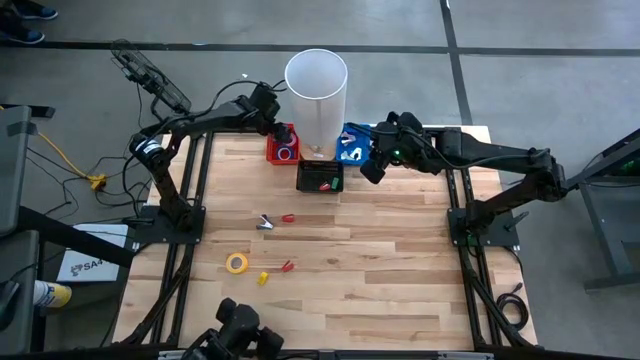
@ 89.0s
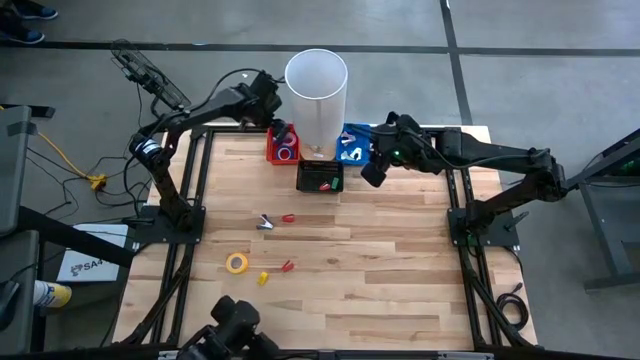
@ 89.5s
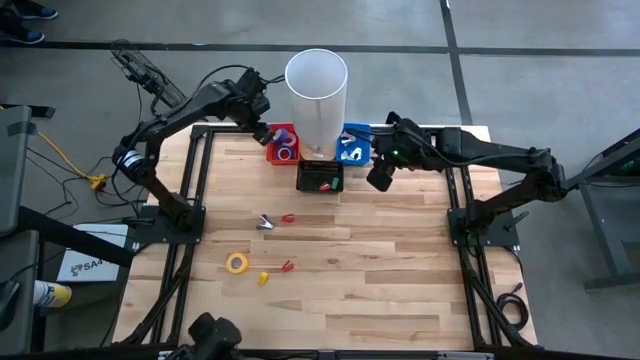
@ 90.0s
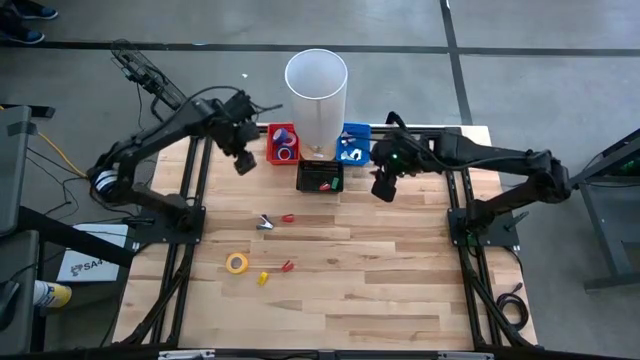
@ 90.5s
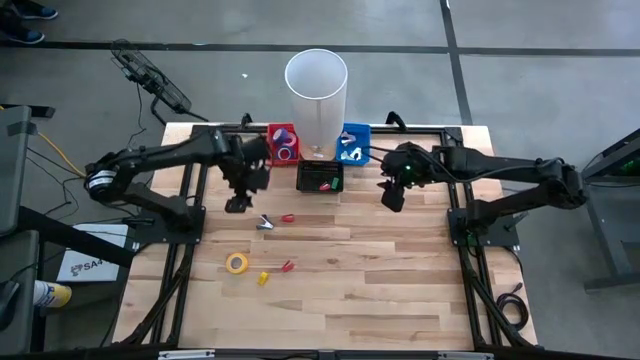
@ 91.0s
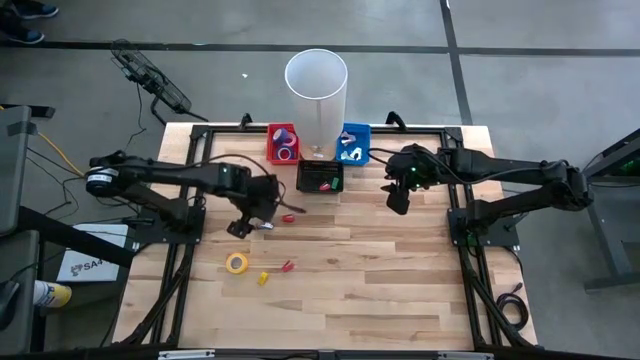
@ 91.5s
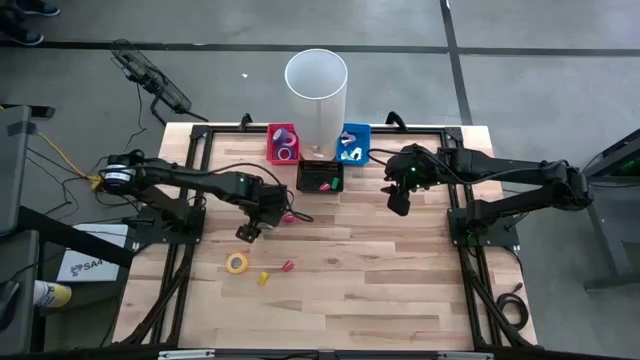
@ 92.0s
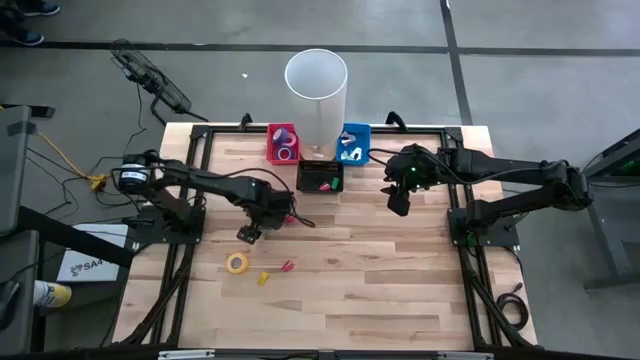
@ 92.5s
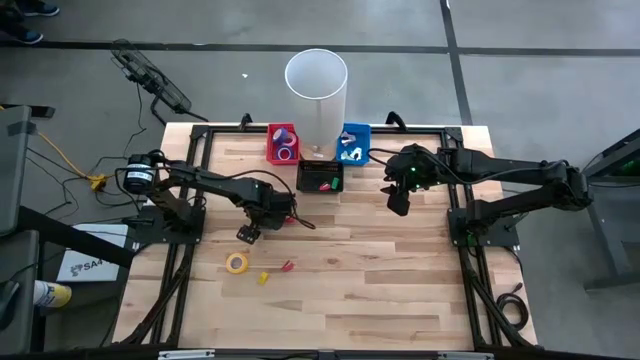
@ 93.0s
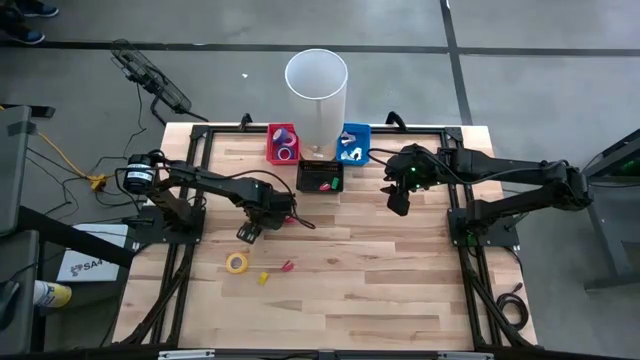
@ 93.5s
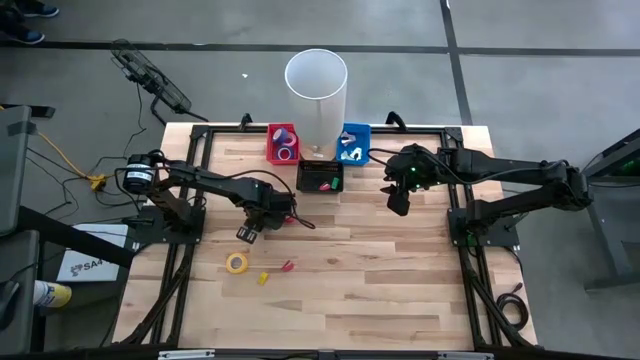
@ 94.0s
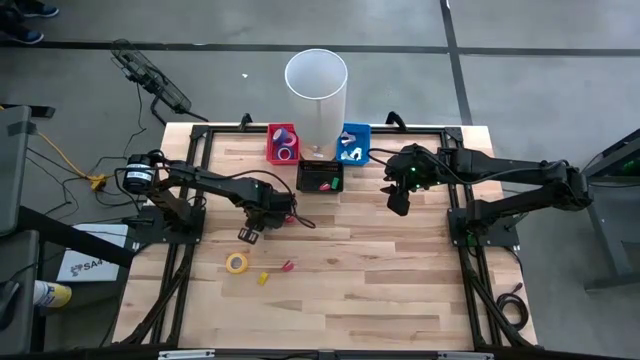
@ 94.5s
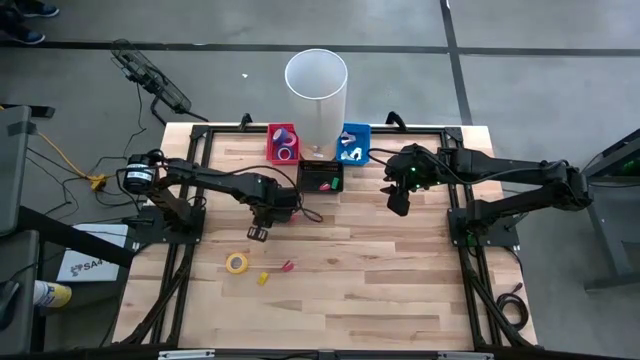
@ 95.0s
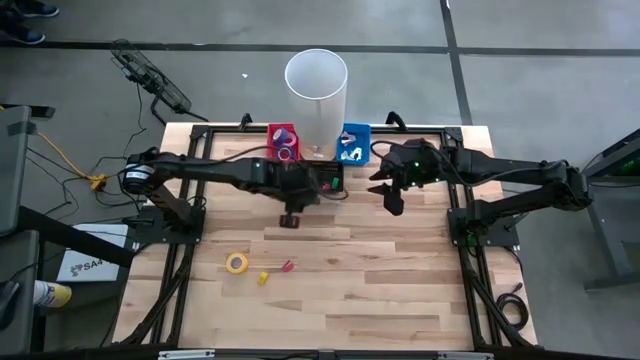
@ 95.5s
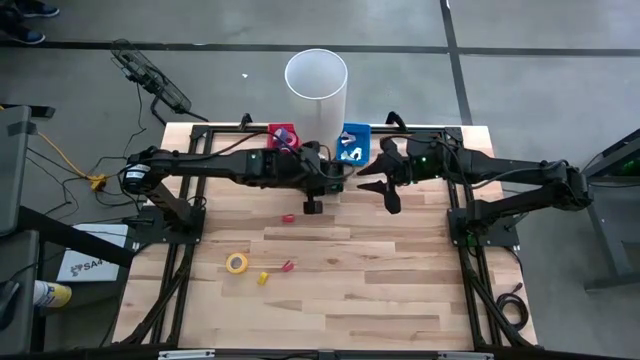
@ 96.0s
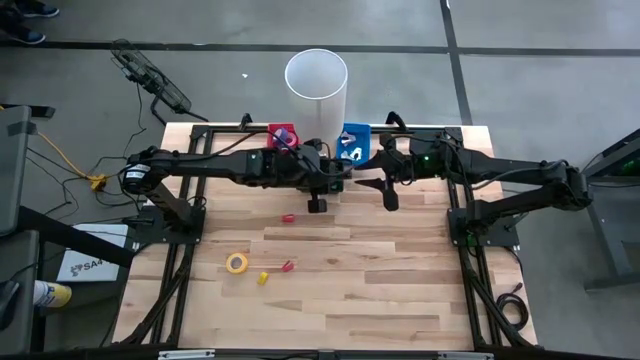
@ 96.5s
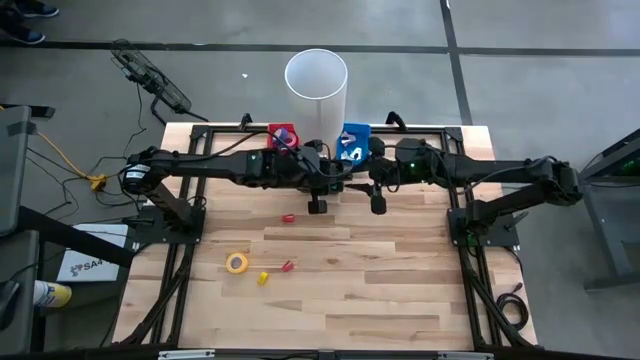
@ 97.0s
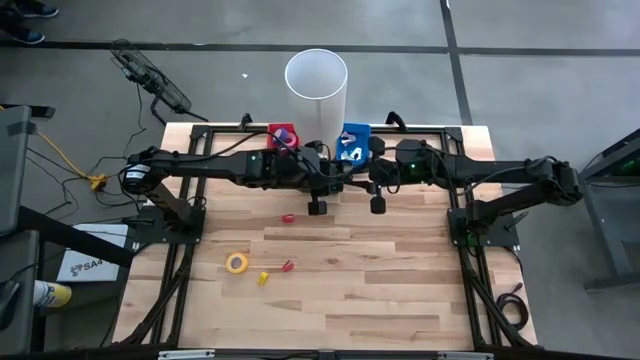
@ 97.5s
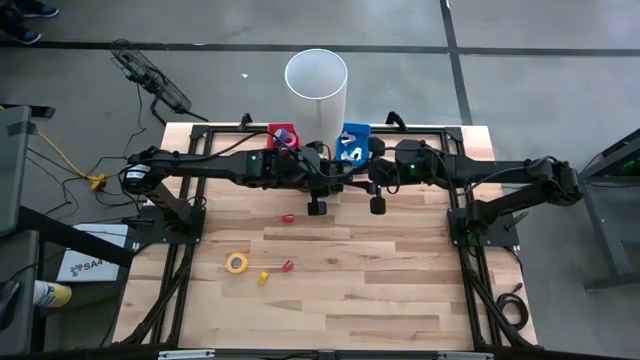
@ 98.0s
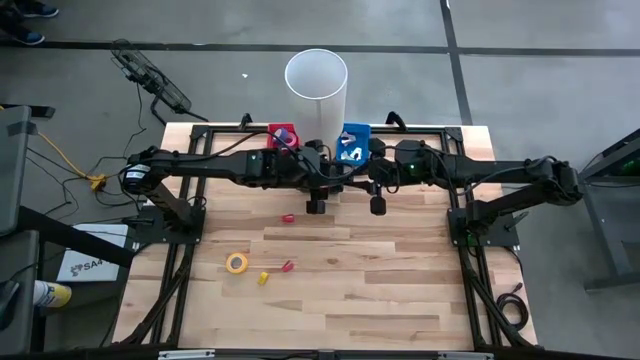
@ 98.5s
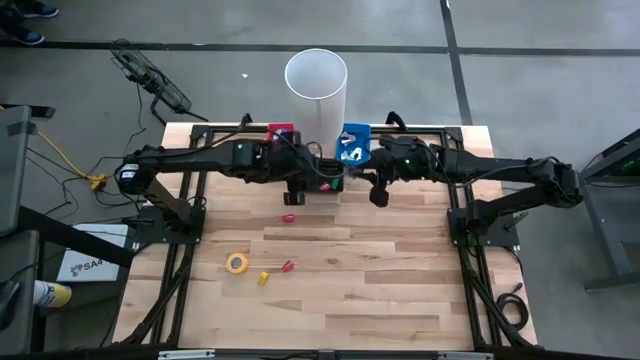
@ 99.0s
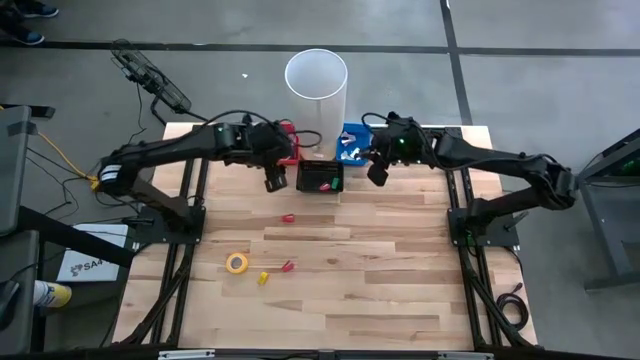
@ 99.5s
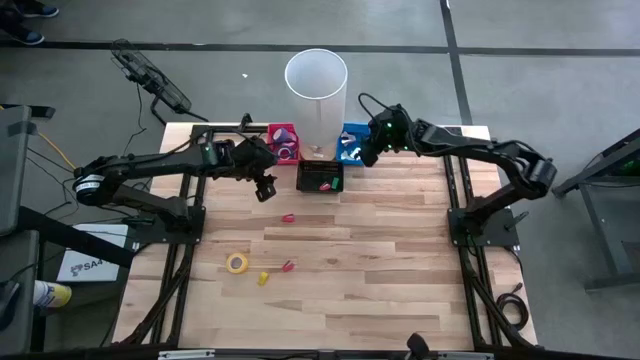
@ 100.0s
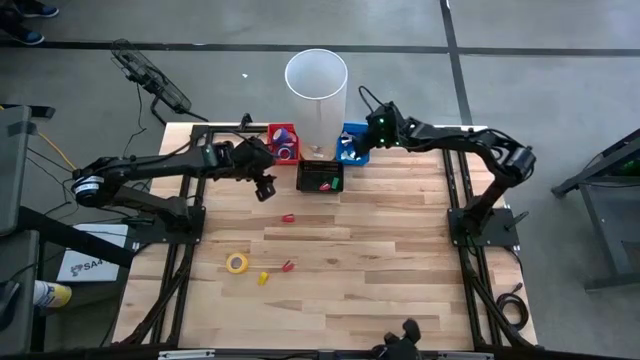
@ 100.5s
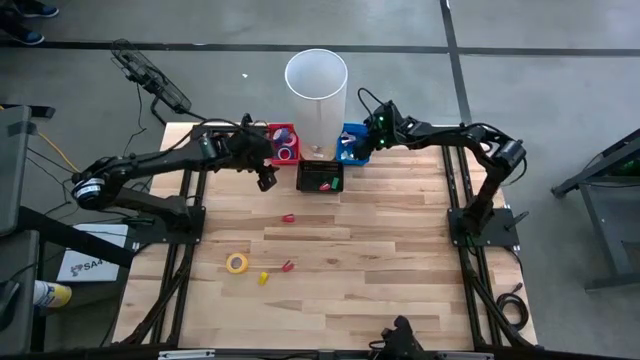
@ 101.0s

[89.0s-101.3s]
Task: Pick and place Stapler, Stapler remover, tape
Put the black staple remover into the blue bin

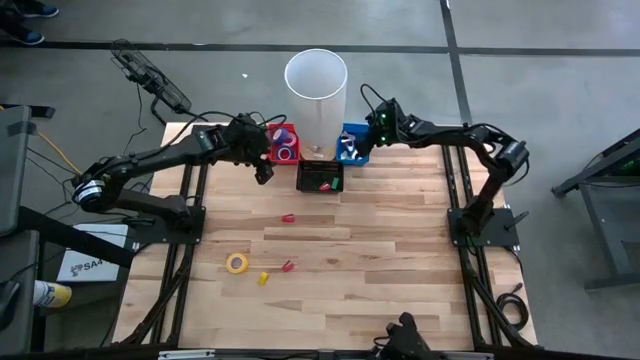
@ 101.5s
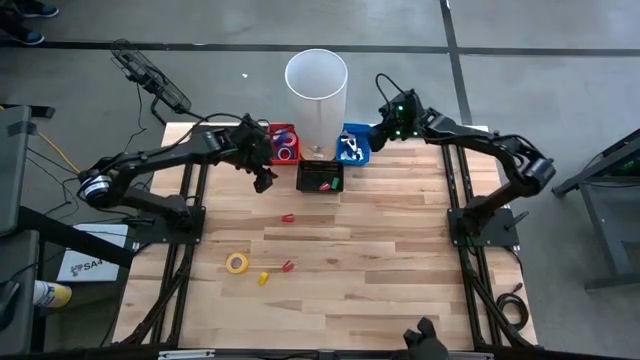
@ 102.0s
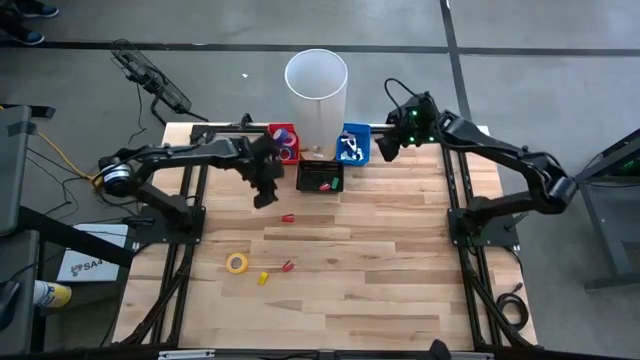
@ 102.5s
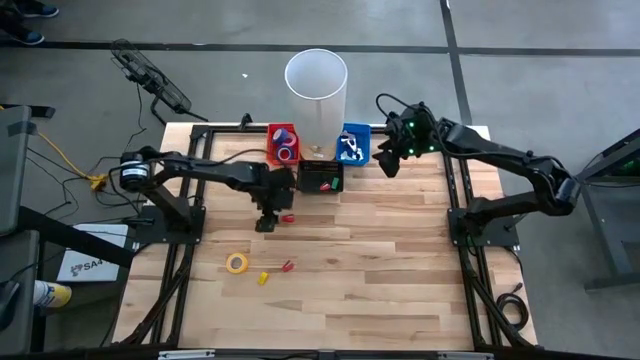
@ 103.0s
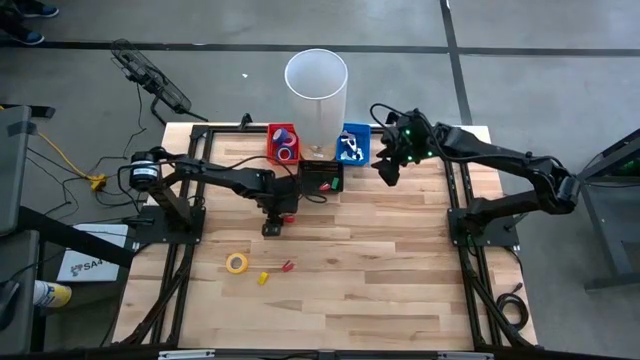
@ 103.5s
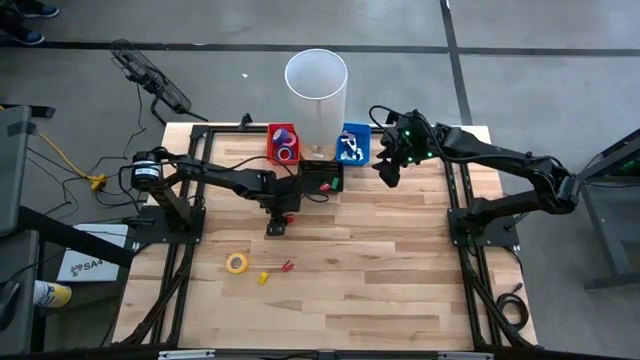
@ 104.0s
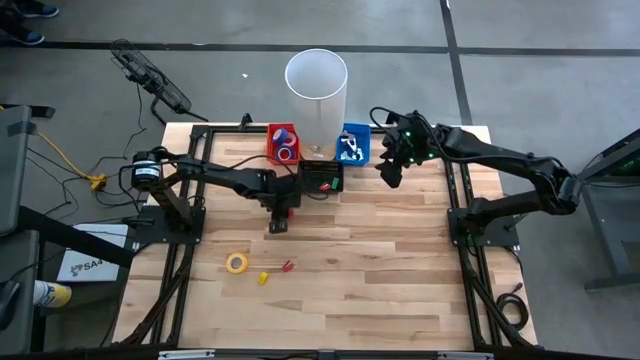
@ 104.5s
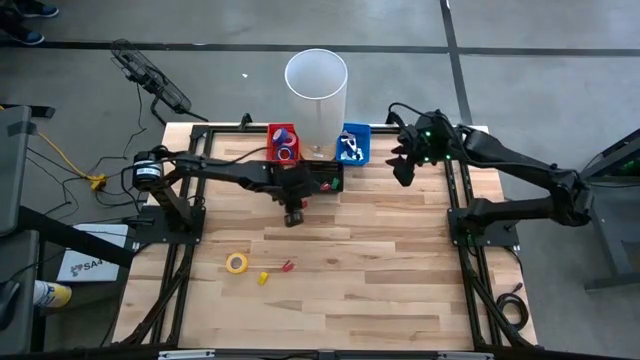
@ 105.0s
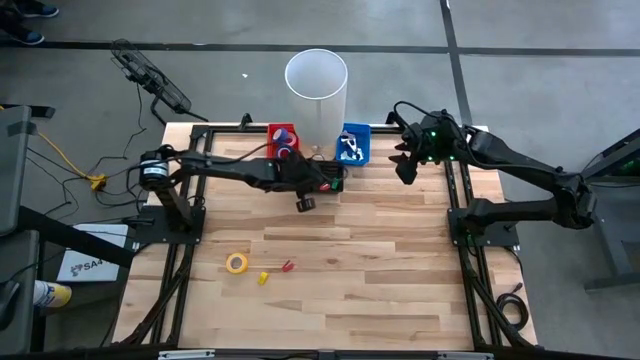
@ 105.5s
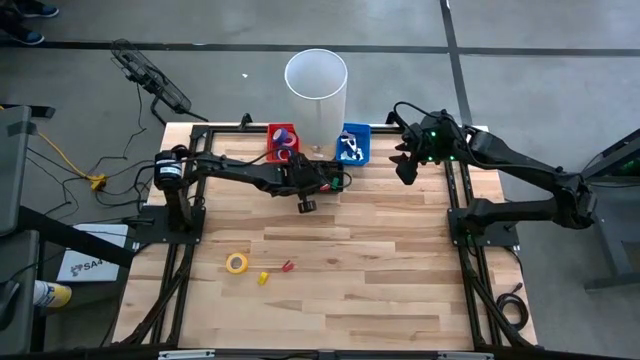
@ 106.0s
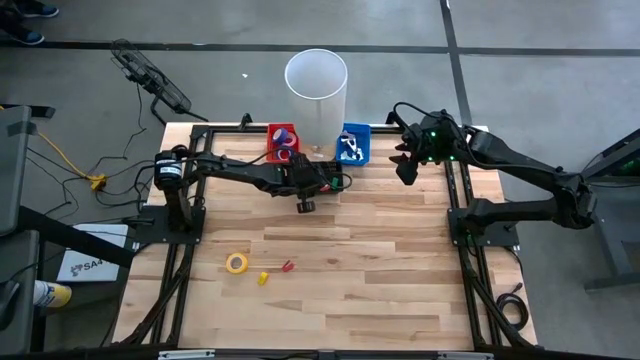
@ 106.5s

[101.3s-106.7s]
Put the red mini stapler into the black bin

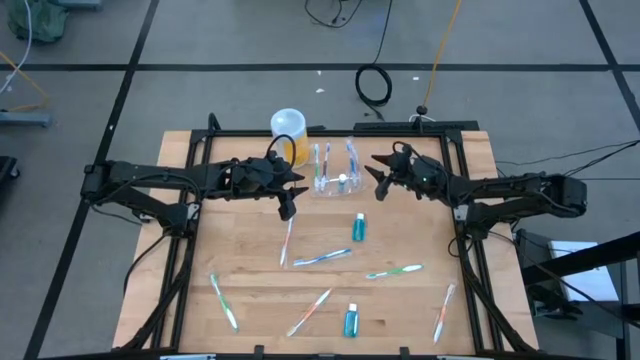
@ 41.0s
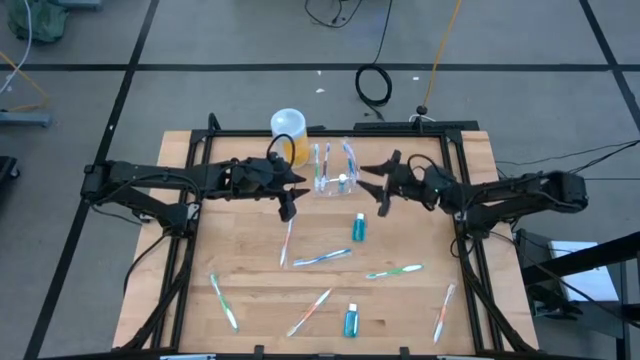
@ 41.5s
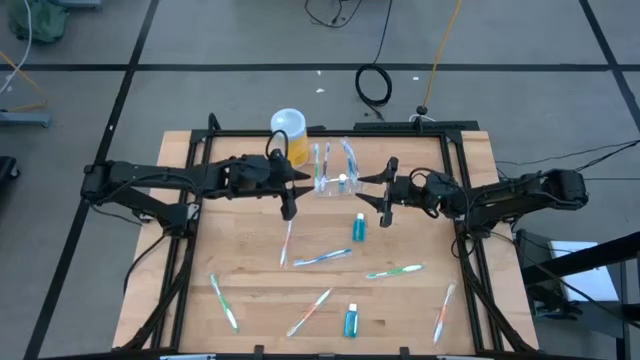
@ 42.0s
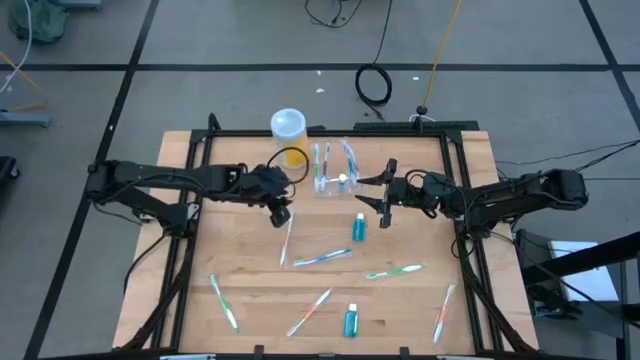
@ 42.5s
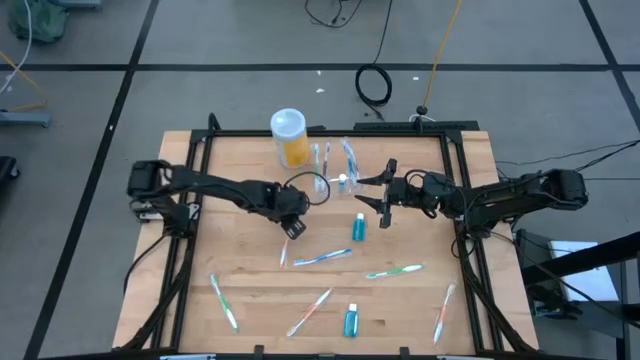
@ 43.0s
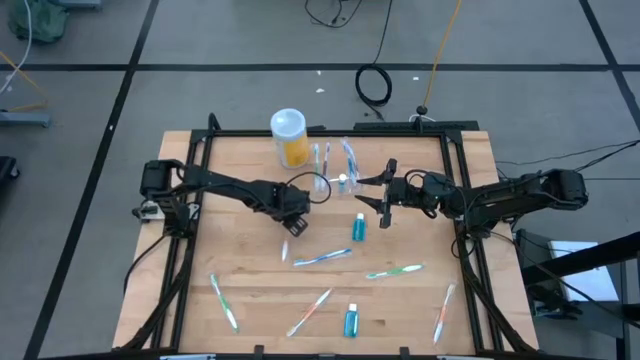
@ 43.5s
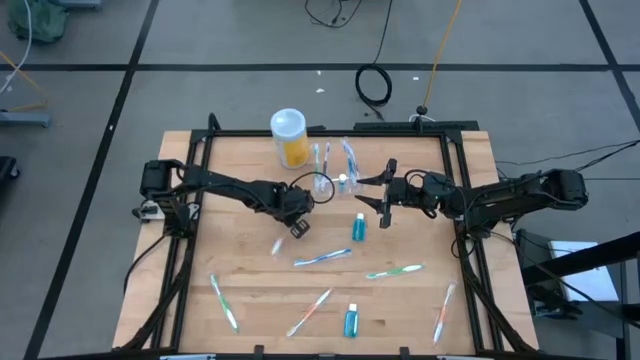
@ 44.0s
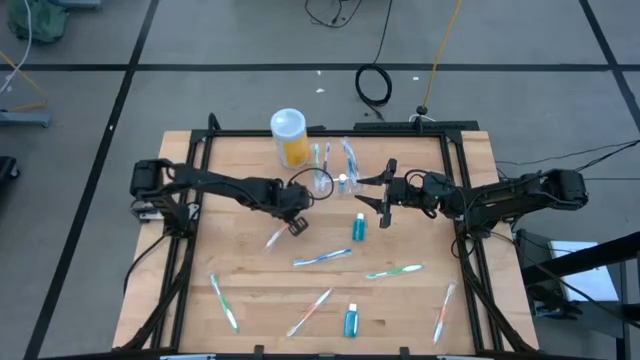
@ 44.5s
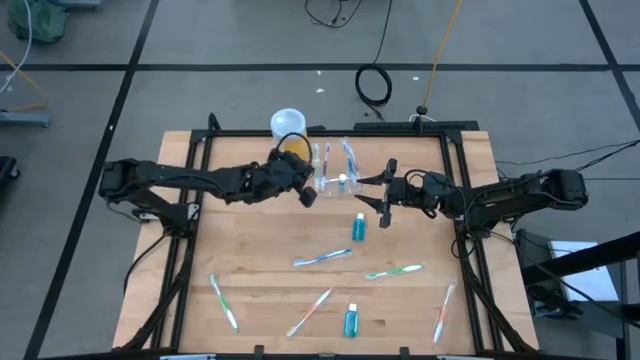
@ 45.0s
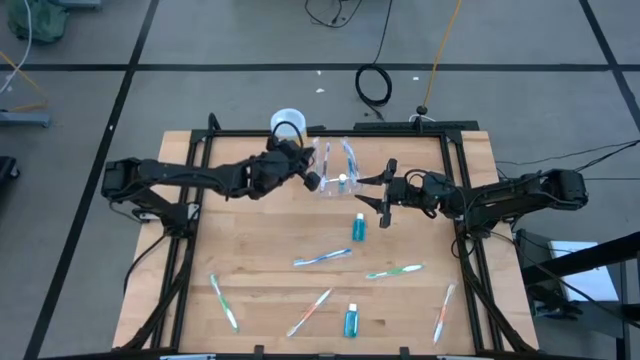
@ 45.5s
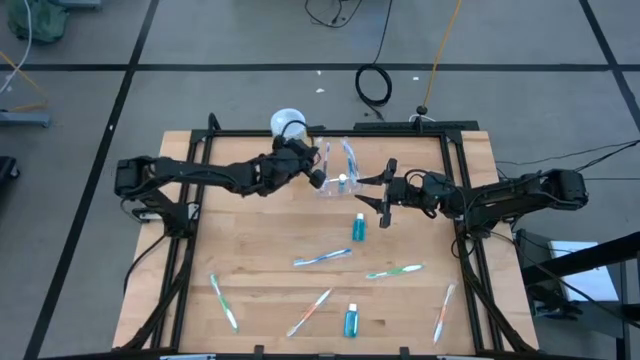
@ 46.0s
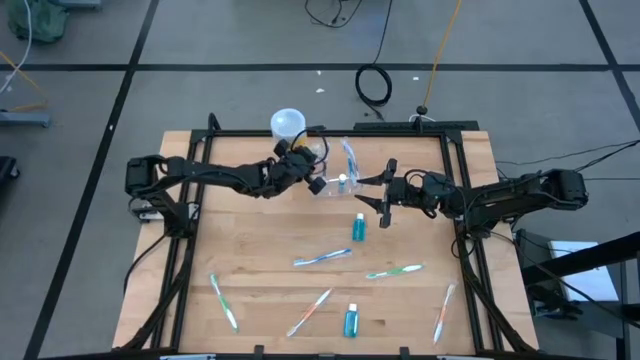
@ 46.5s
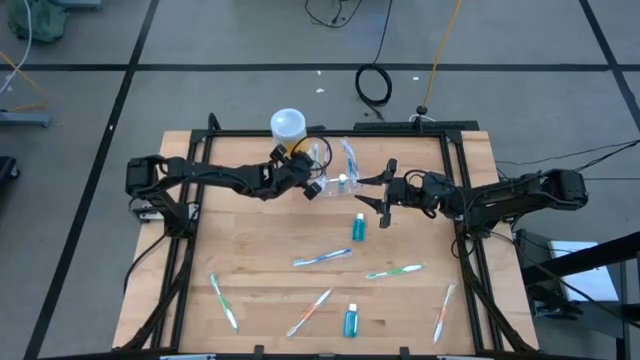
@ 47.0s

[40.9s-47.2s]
Task: Pick & Place toothbrushing station
Put the top orange toothbrush into the transparent organizer
